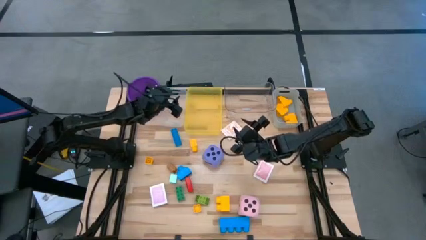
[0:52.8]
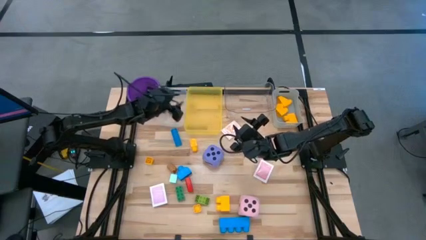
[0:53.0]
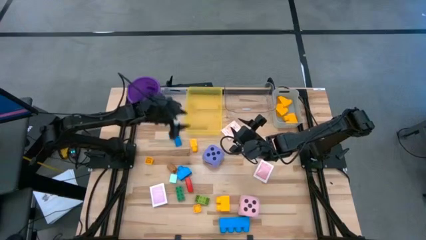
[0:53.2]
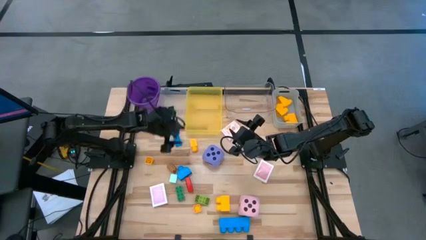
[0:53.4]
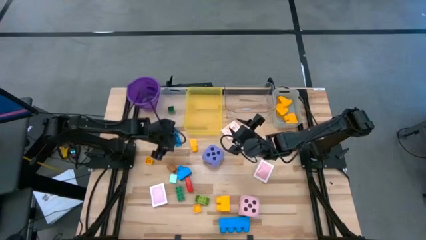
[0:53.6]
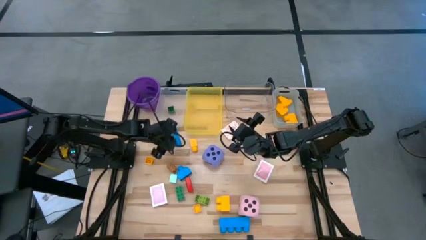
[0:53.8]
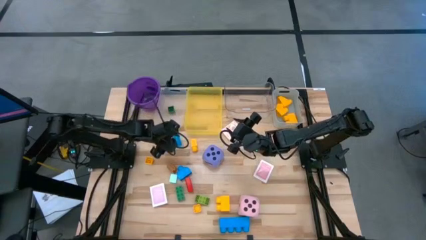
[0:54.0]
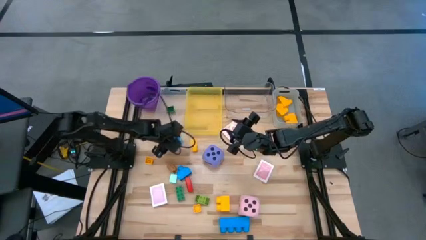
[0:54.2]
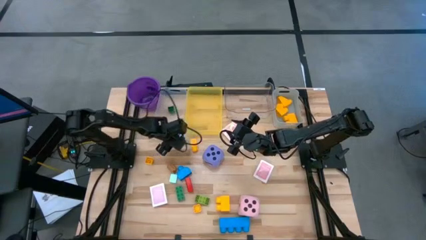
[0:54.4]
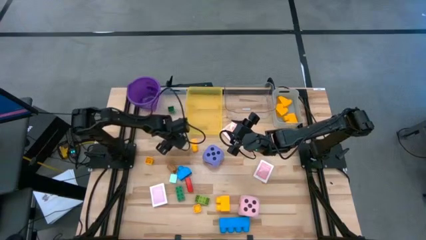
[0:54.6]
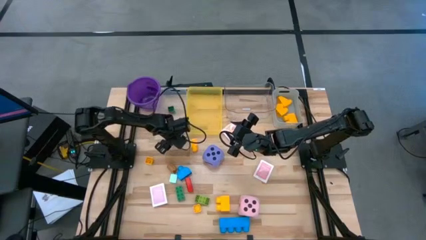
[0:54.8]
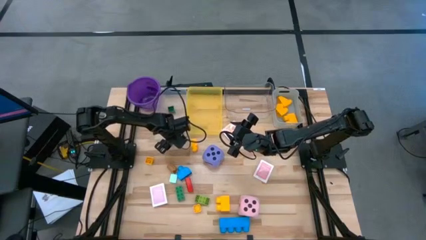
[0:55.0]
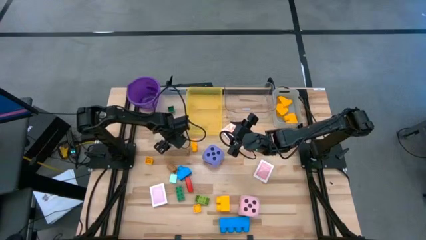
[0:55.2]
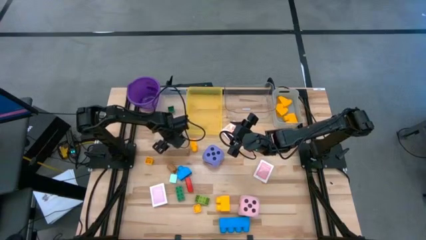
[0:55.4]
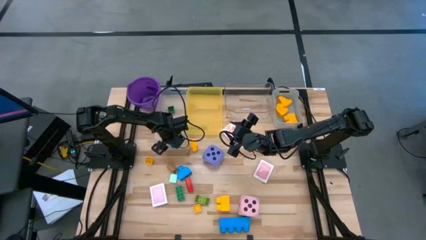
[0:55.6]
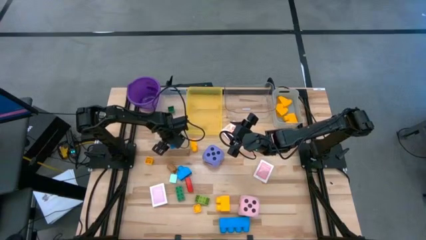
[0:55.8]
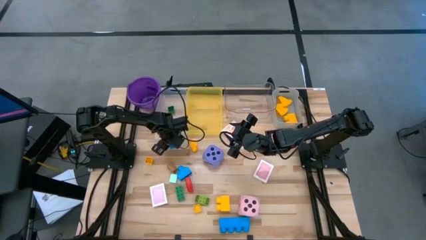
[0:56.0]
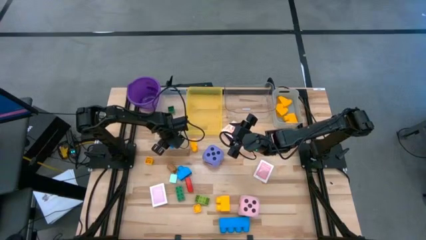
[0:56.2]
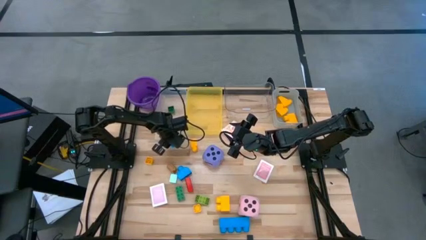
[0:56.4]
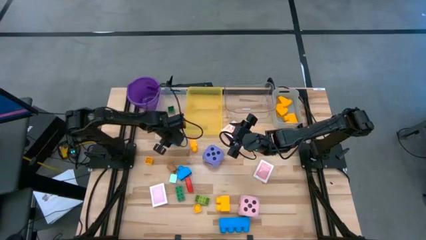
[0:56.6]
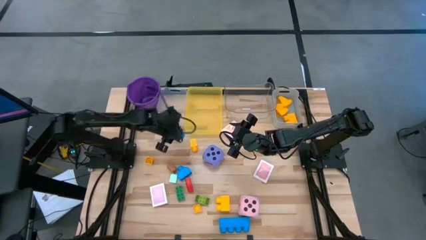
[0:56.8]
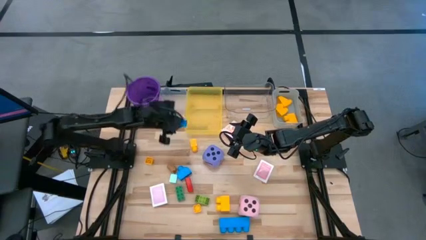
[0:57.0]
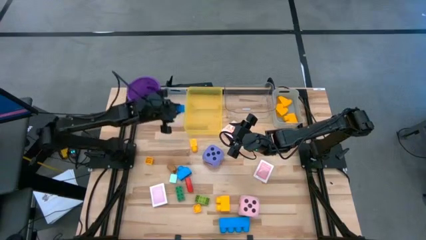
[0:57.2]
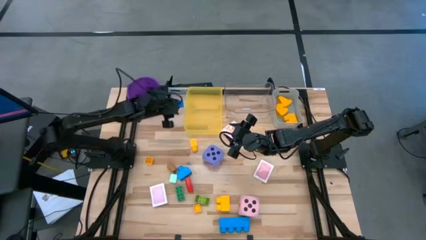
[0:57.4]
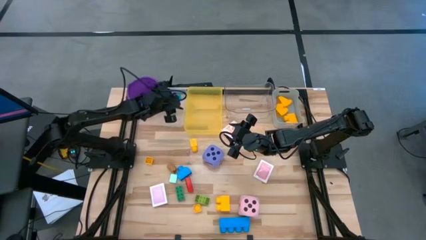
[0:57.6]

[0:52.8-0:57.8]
Task: Pick & Place Toys
Put the small blue game piece into the white bin

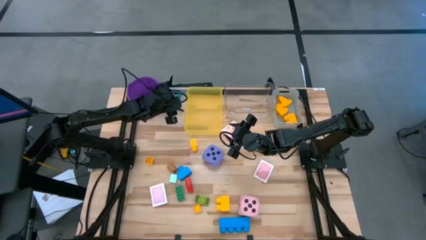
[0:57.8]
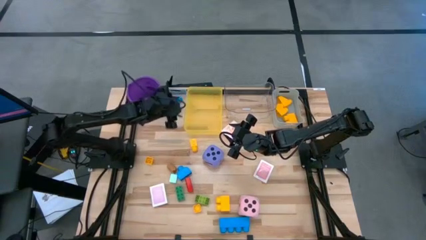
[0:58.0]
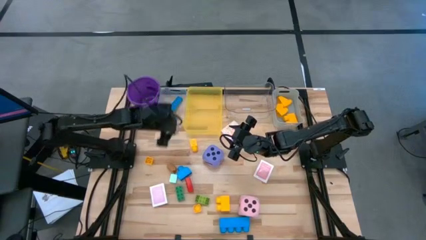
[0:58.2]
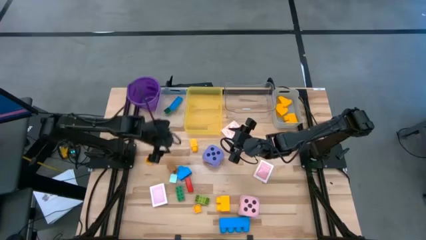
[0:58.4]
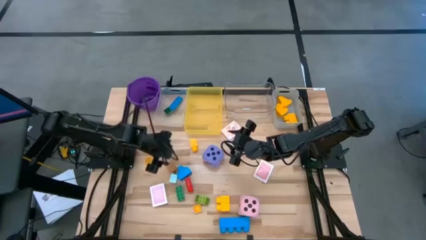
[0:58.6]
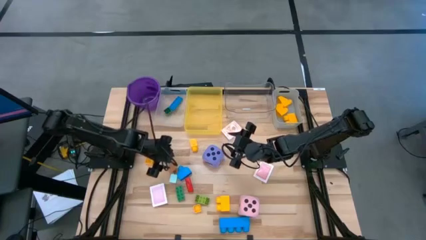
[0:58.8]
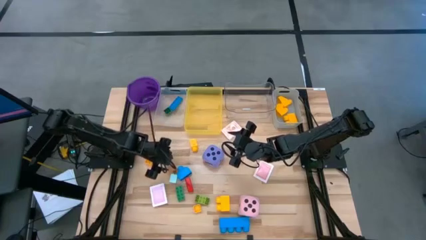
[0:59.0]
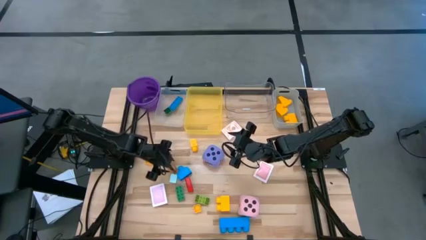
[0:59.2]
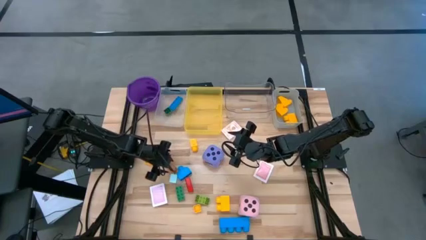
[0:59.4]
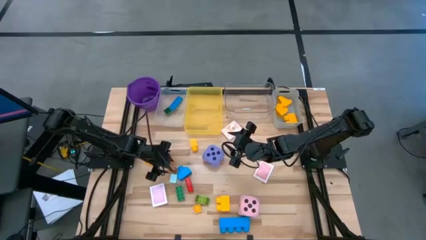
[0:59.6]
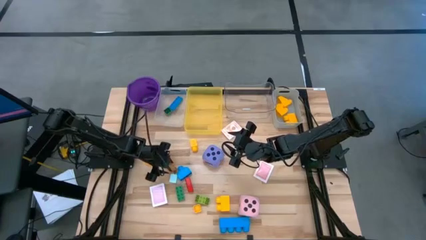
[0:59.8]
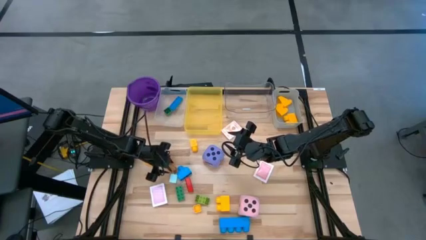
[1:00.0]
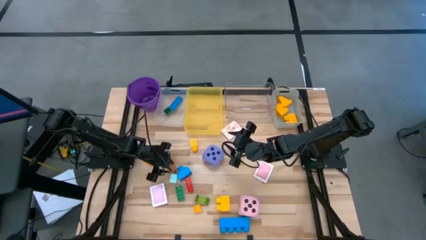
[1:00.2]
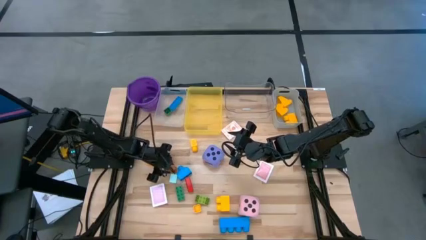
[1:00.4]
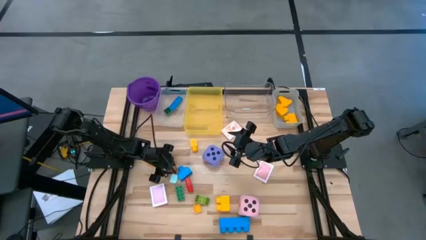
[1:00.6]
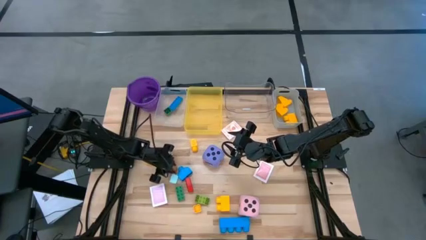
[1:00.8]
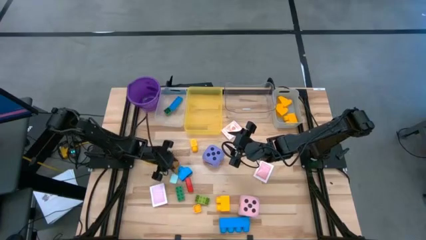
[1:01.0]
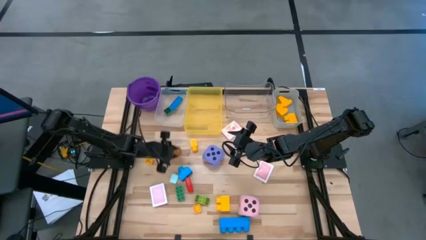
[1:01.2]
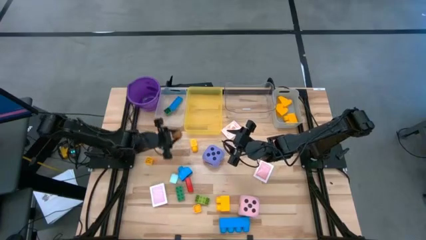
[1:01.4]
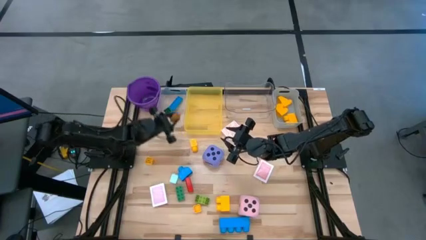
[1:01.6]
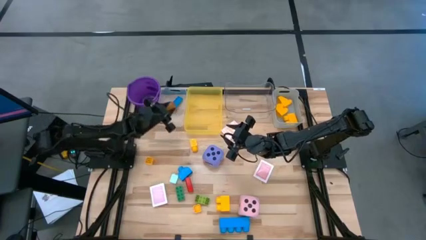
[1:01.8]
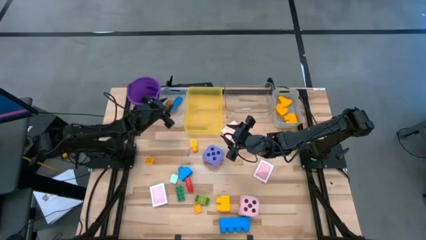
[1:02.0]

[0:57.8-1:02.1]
Put the small brown game piece into the white bin

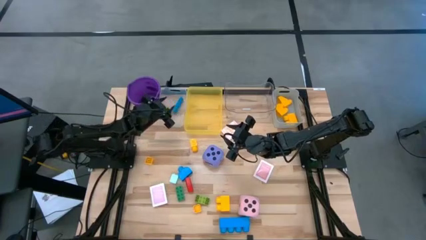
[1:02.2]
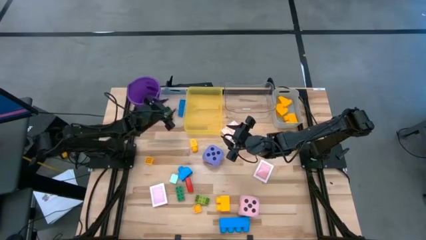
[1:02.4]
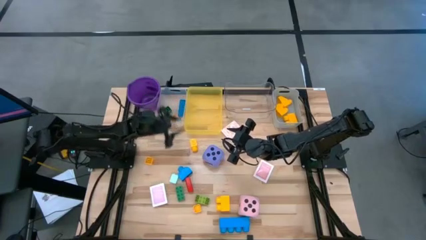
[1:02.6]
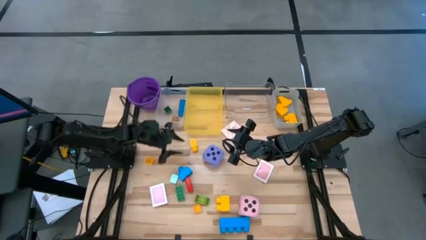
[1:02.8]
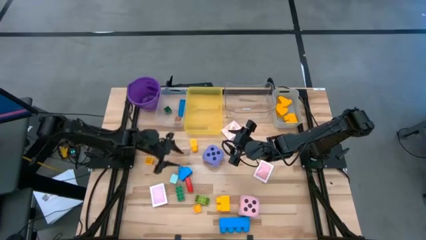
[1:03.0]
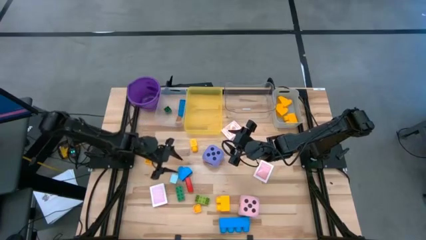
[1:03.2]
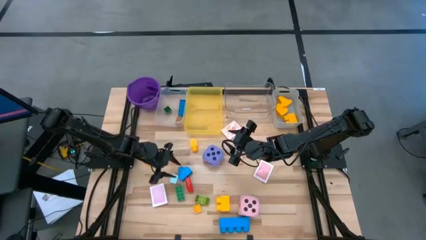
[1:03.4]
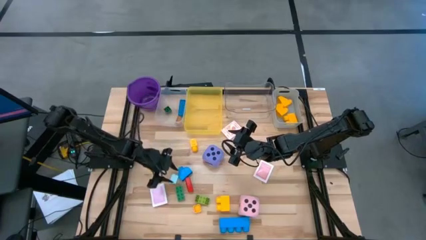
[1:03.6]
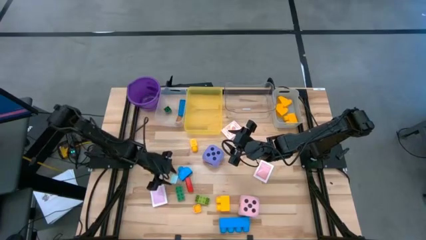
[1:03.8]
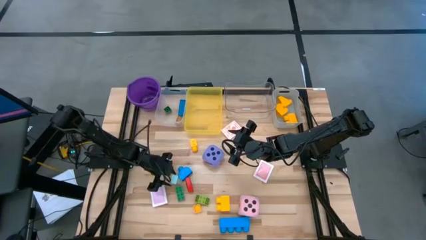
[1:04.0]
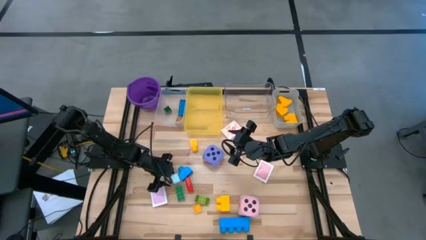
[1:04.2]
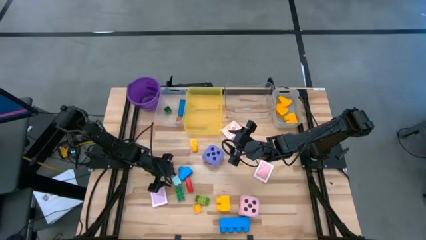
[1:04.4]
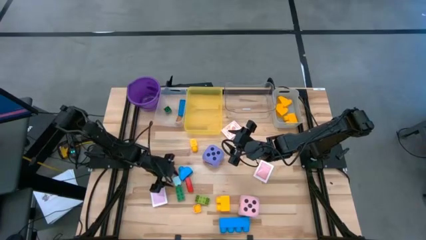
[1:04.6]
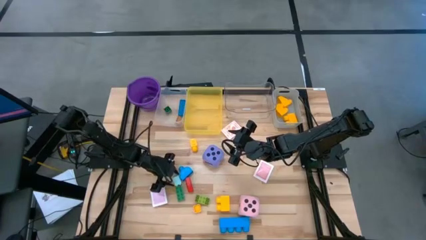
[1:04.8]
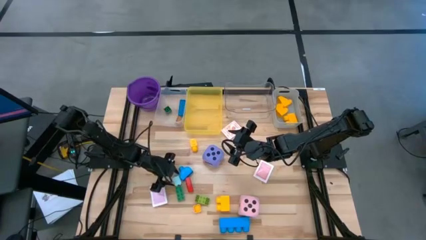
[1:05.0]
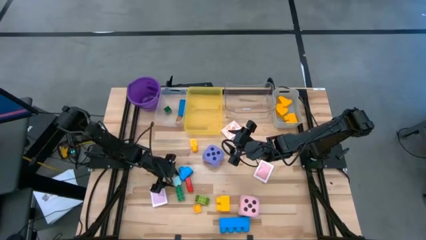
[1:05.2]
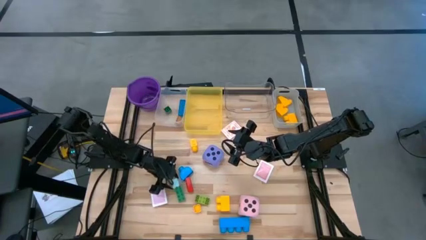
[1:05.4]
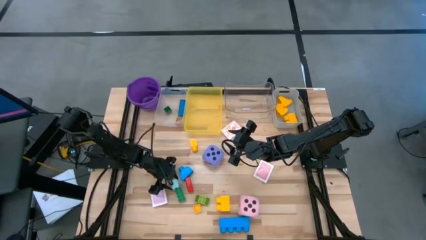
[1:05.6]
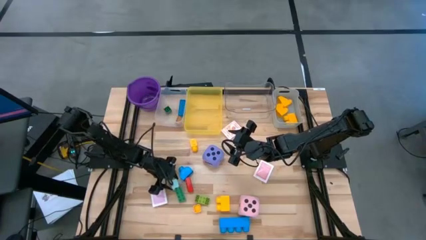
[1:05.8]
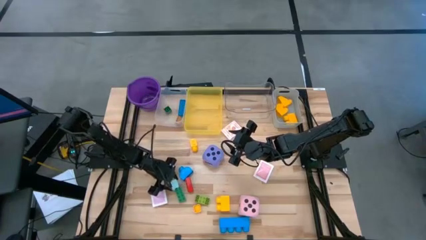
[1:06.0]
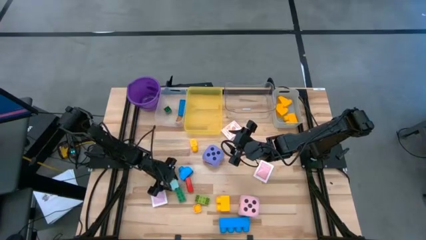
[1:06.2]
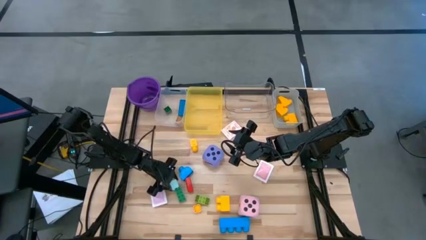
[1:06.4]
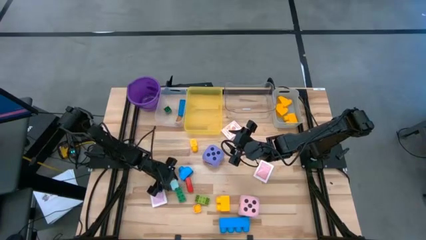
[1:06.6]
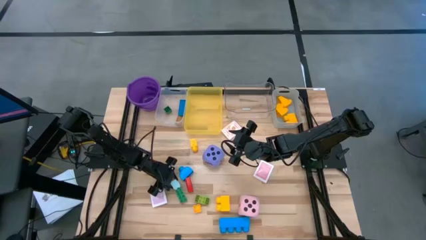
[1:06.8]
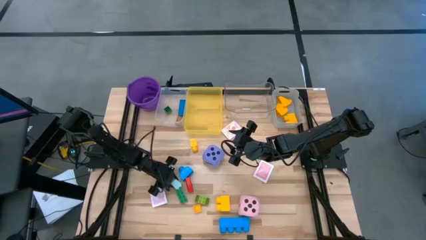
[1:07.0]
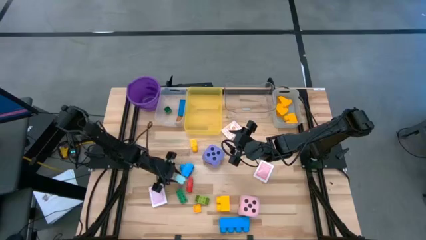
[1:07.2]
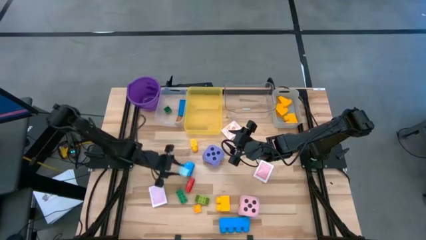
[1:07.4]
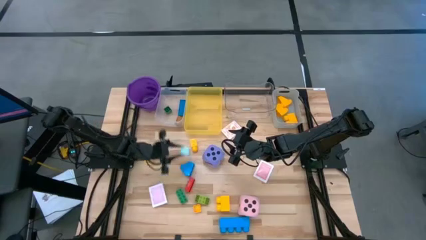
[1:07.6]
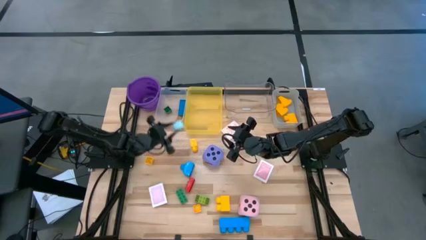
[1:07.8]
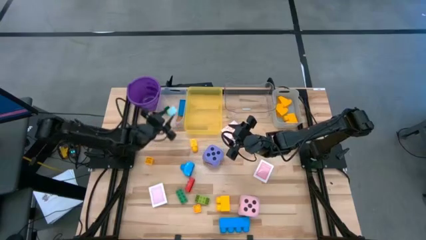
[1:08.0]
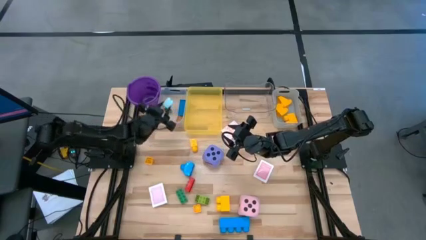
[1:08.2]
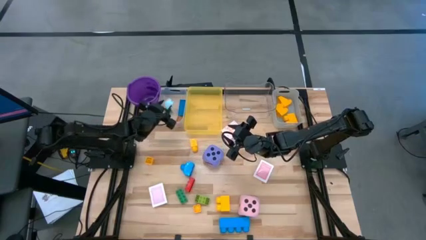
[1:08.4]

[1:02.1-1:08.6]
Put the small light blue game piece into the white bin
